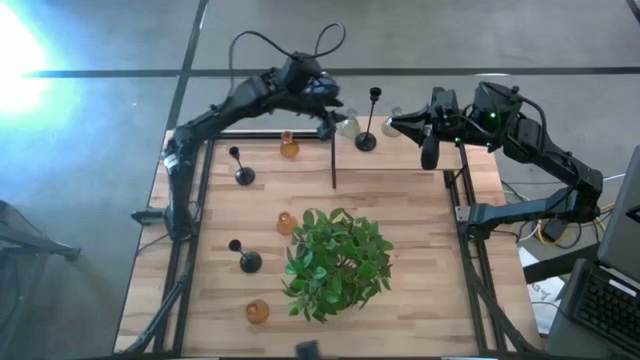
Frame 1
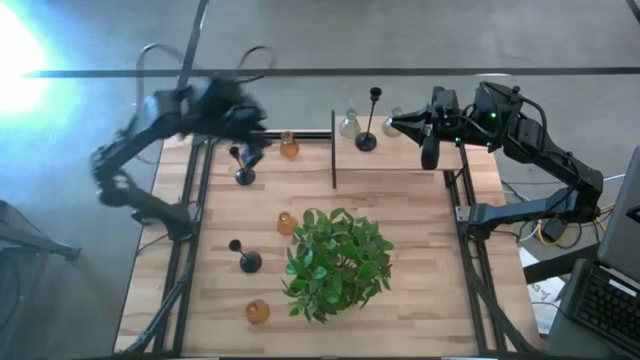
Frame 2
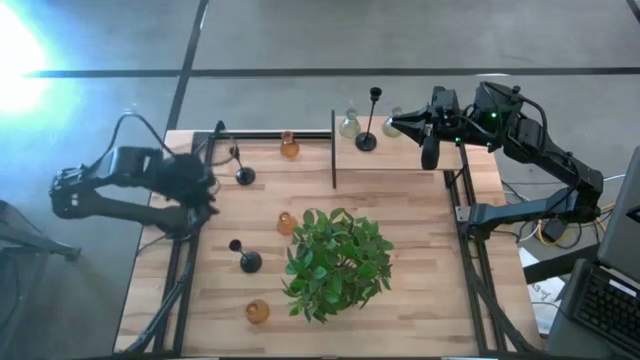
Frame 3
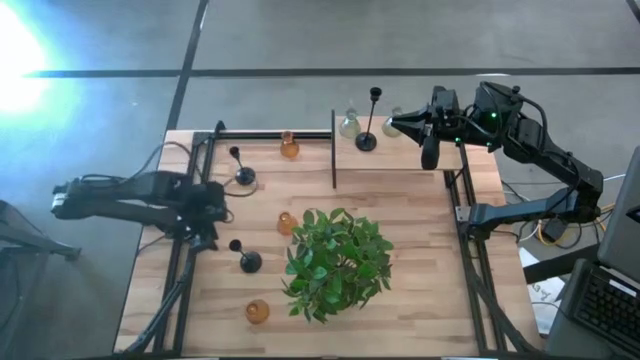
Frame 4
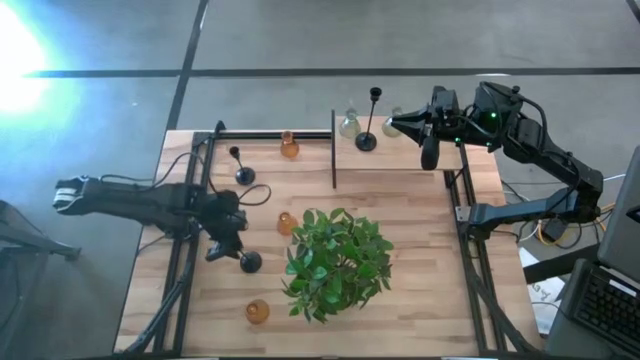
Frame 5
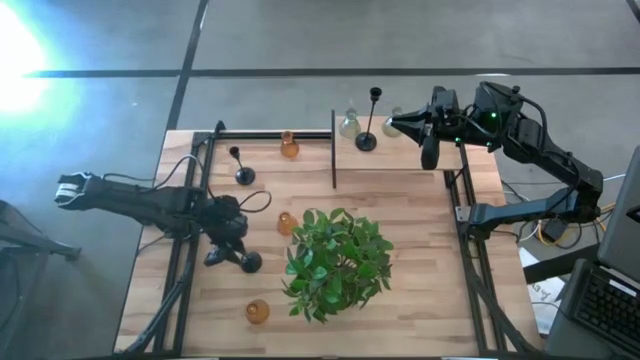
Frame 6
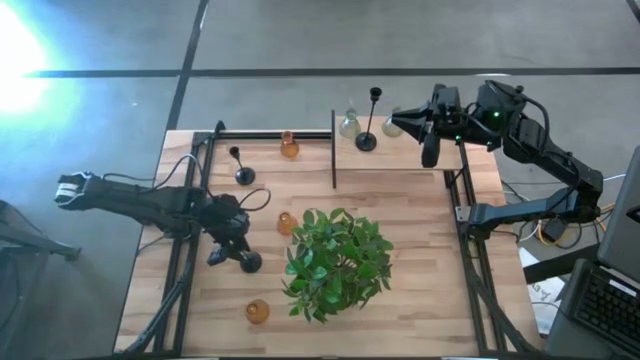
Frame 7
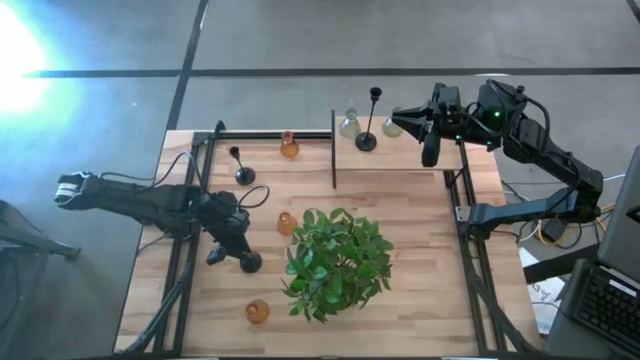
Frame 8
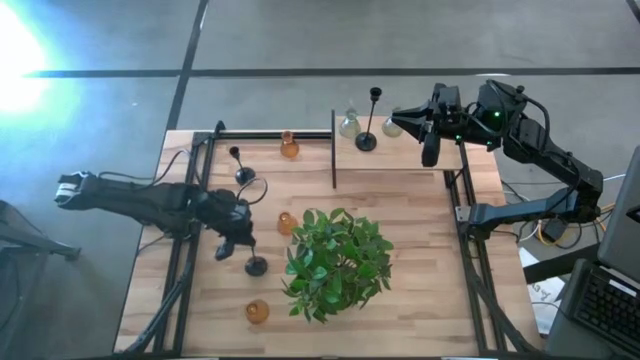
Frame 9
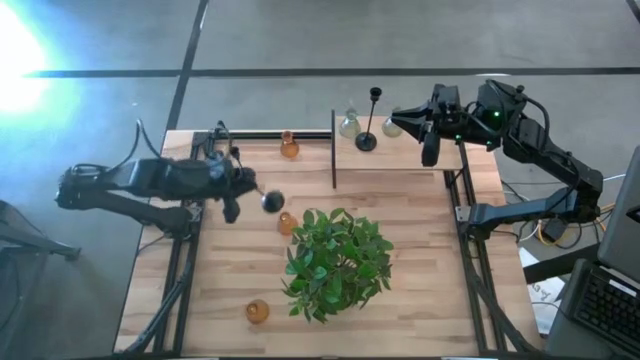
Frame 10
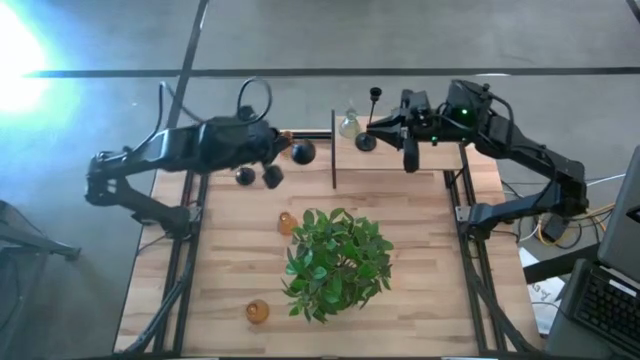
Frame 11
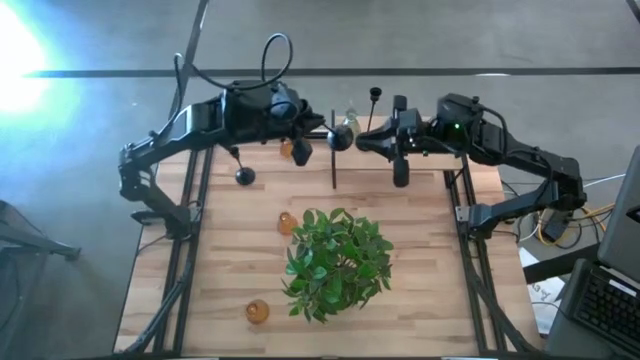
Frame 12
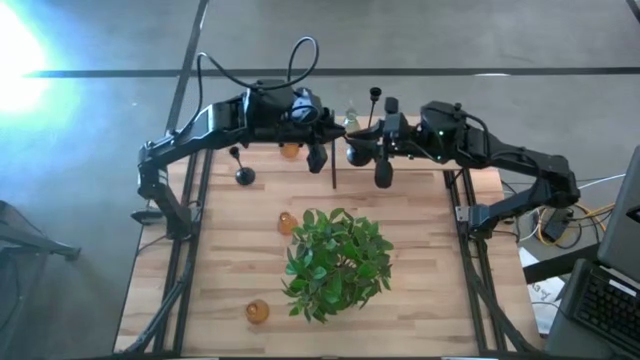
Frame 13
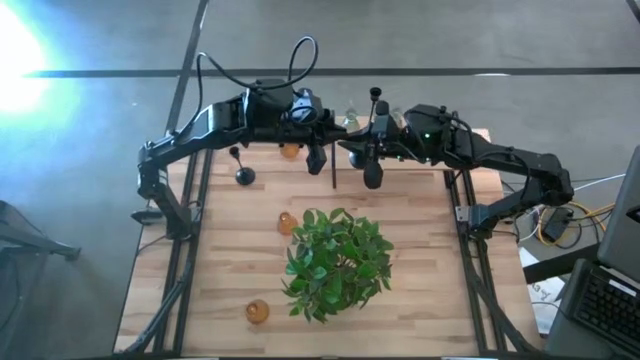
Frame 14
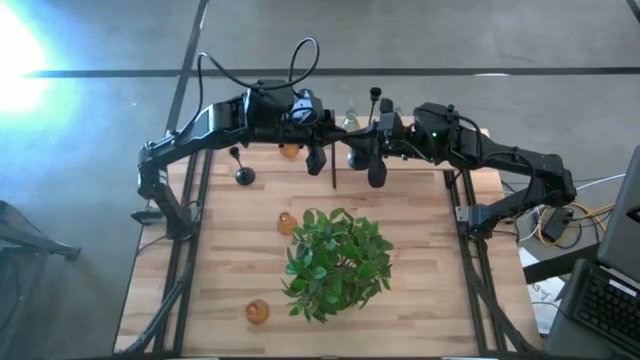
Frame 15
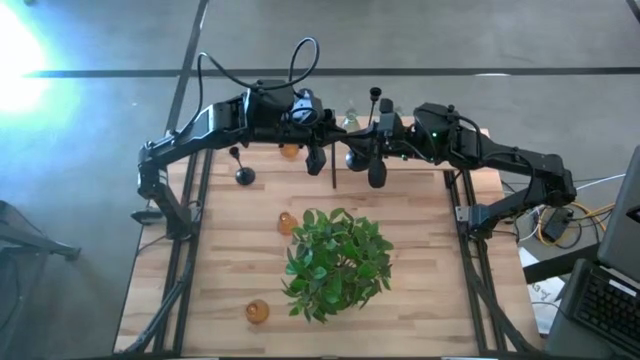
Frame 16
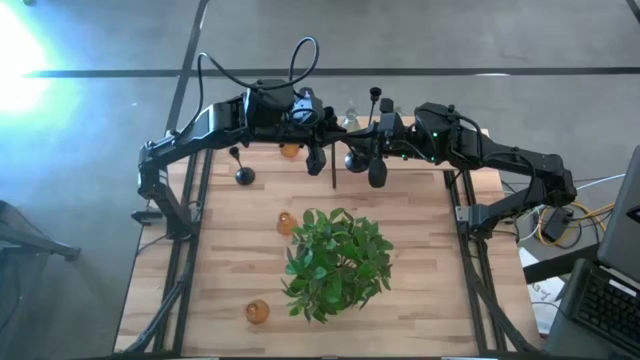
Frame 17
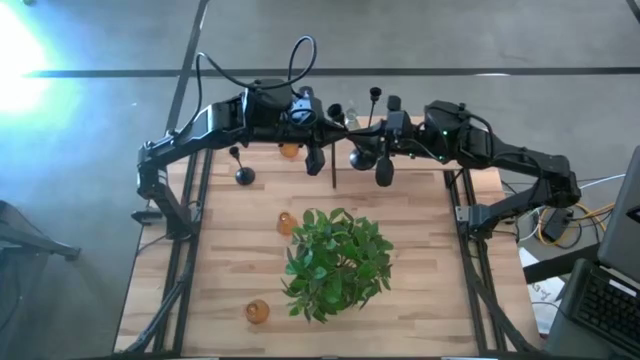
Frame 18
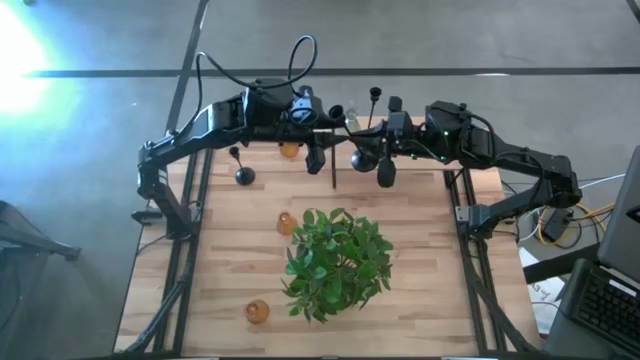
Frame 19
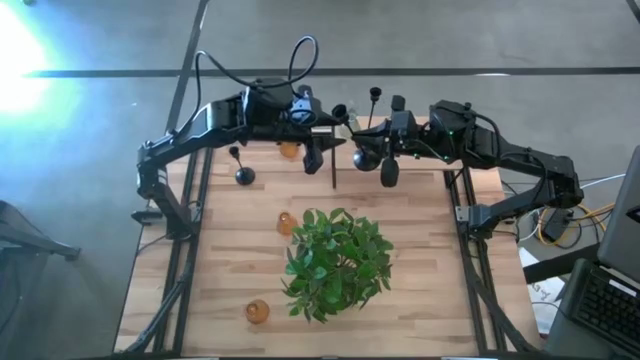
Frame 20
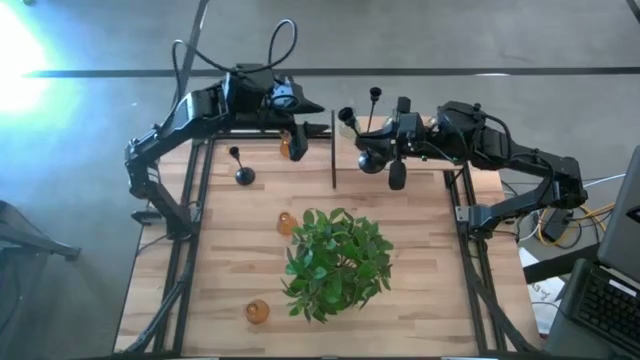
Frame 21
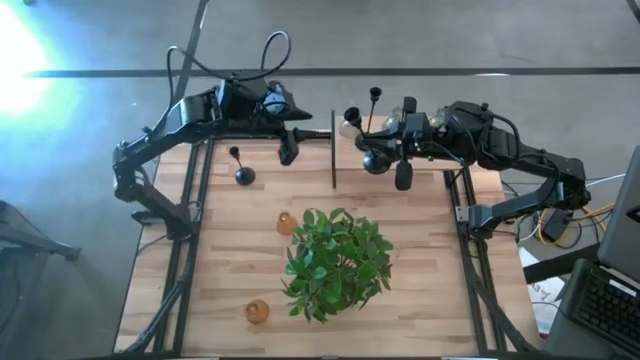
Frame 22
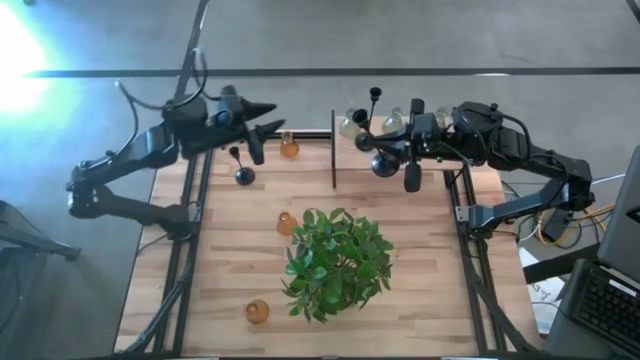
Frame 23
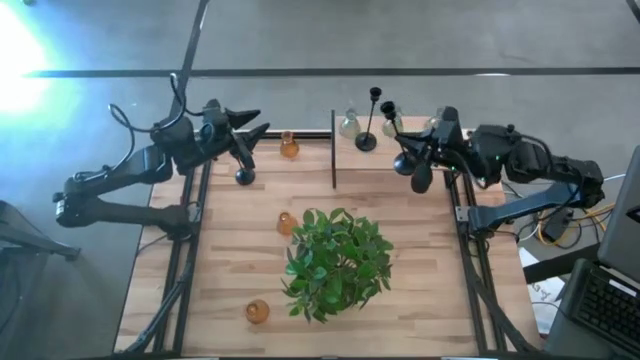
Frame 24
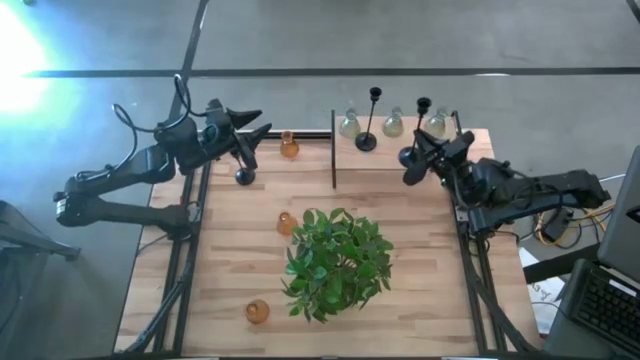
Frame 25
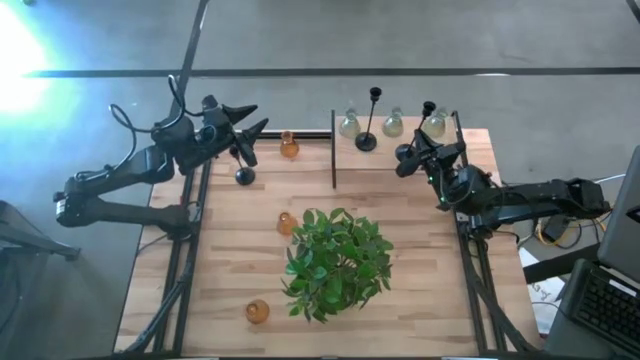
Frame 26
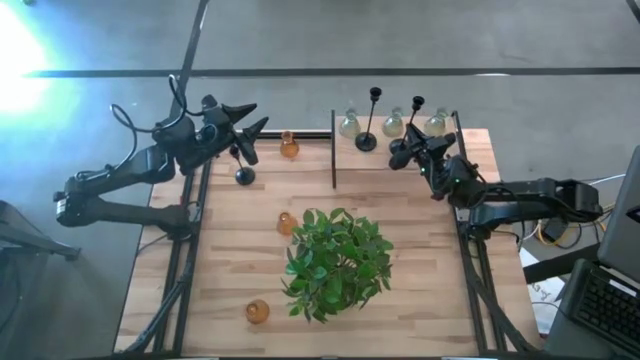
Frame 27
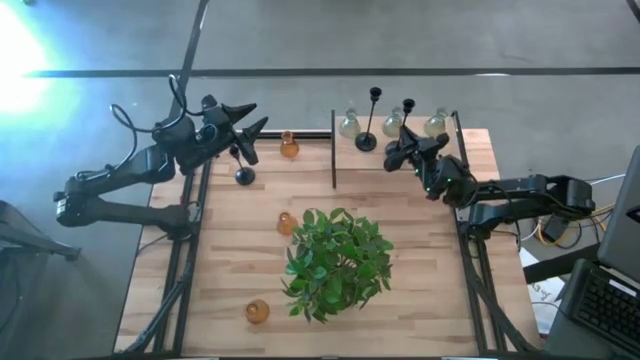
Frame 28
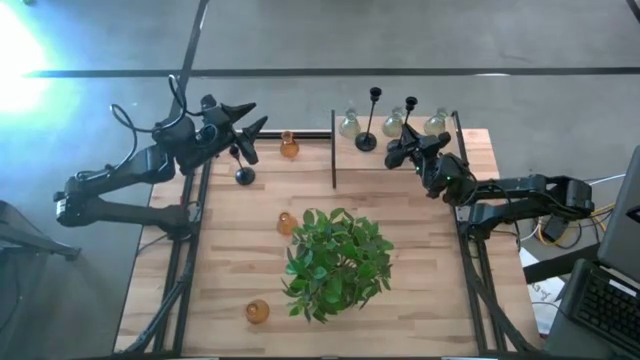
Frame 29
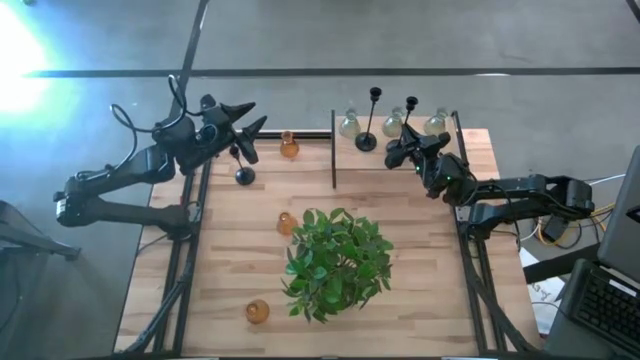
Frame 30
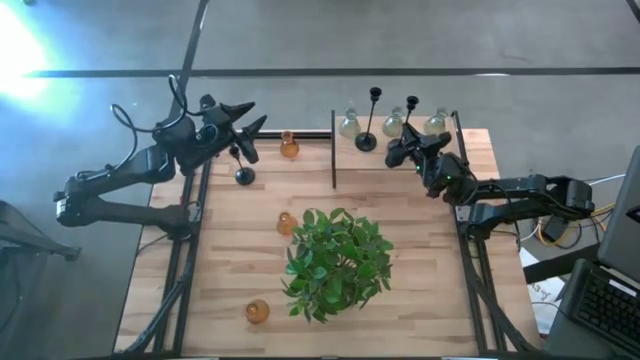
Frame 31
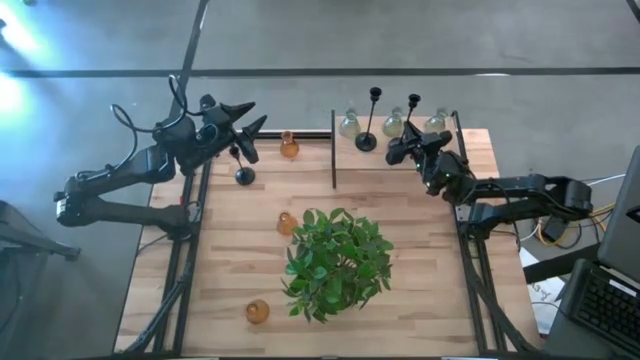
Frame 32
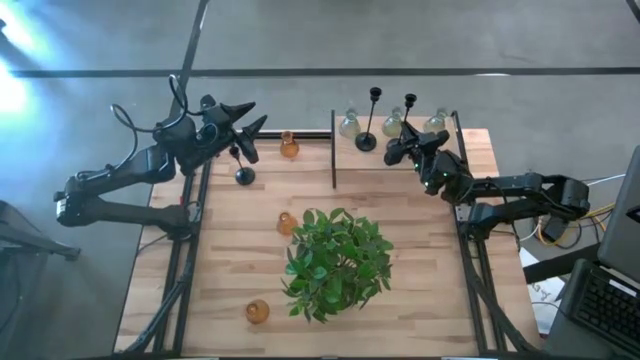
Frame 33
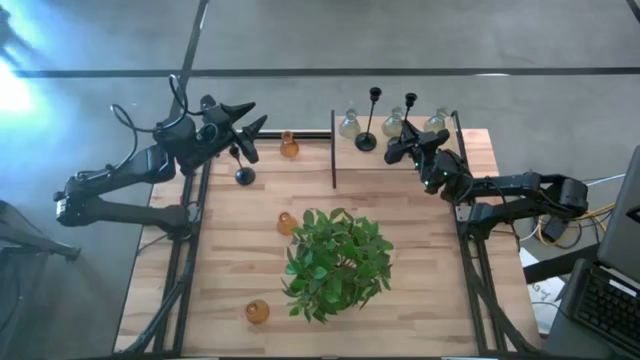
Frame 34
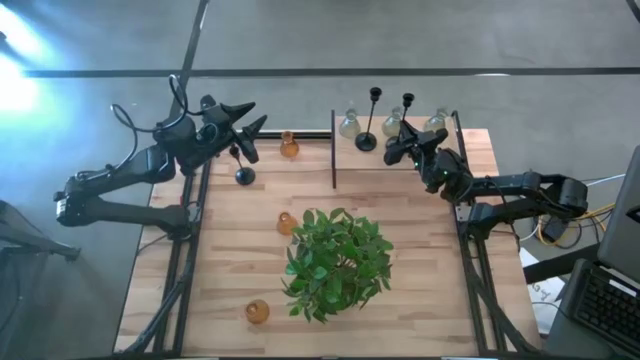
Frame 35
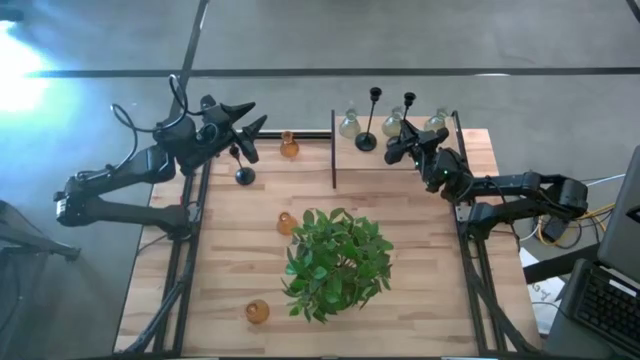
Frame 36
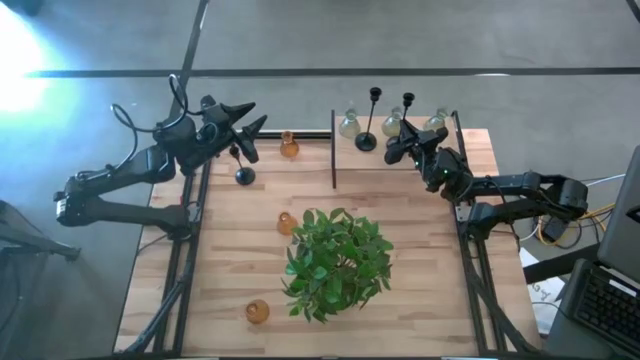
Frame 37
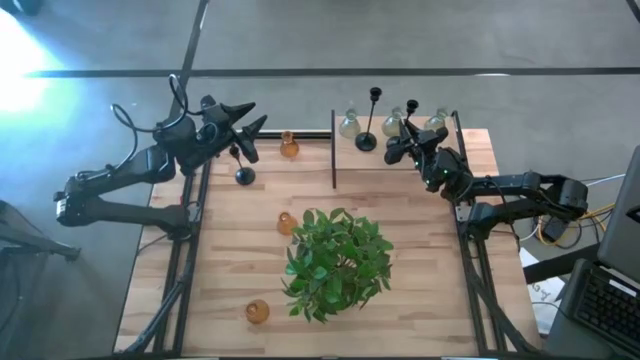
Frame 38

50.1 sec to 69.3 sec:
Task: Pick & Place candle stick holders
Put the bottom black candle holder on the shelf

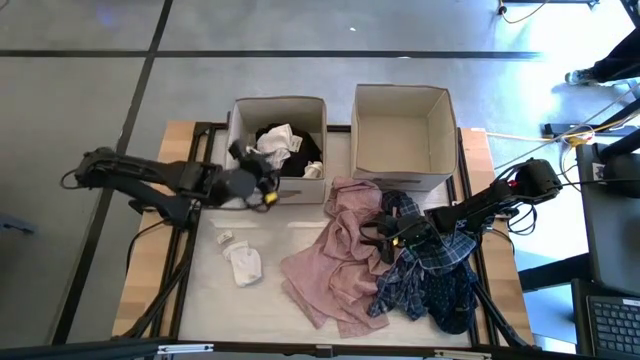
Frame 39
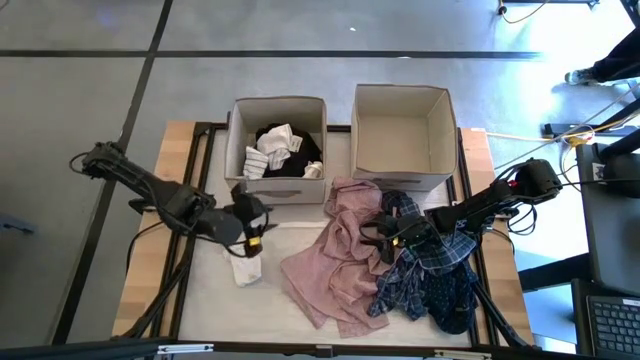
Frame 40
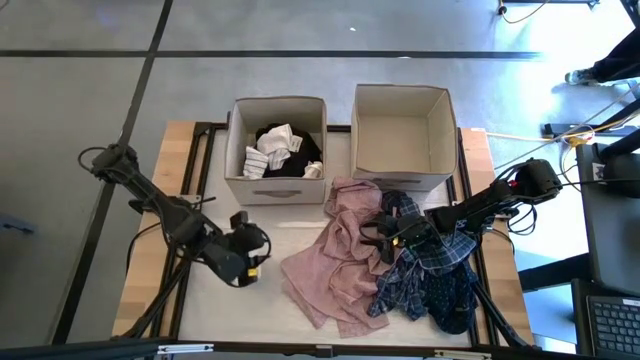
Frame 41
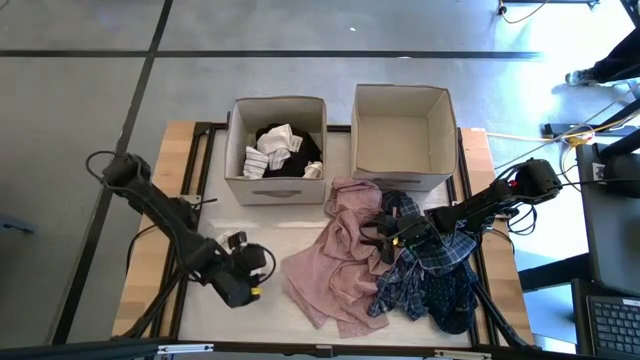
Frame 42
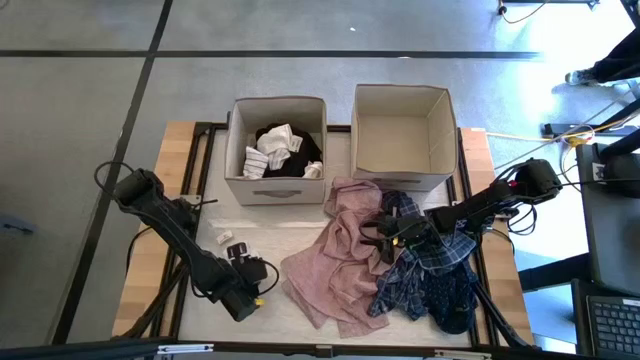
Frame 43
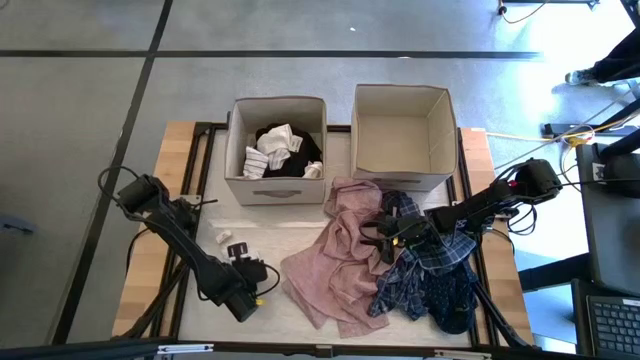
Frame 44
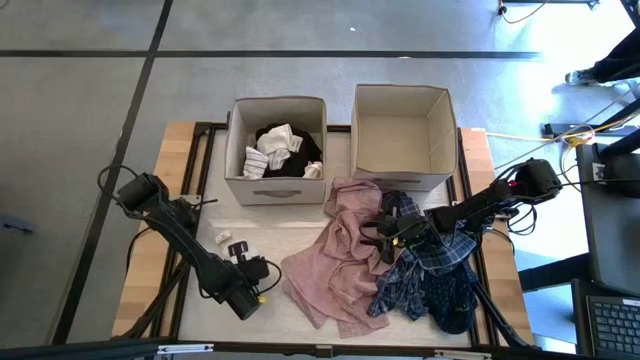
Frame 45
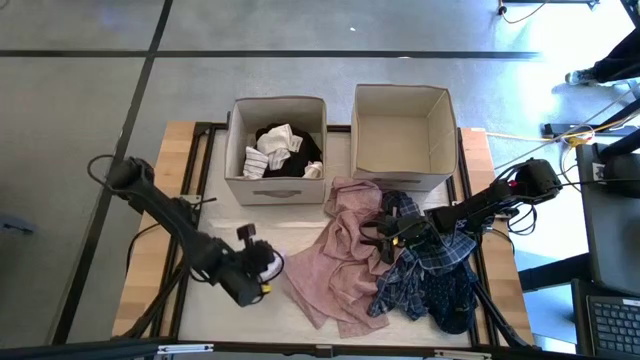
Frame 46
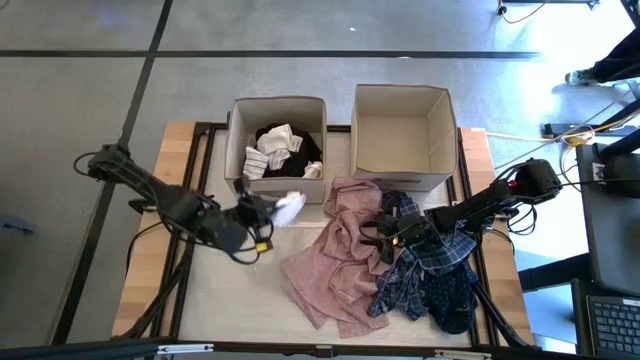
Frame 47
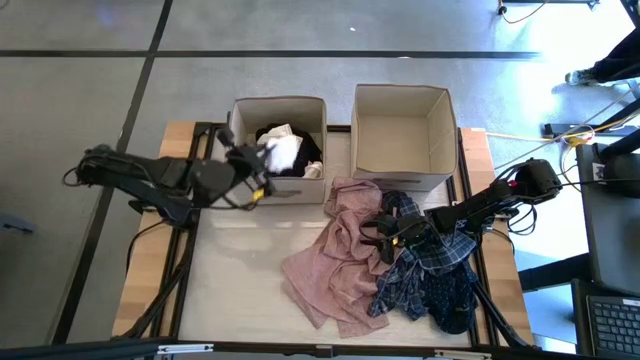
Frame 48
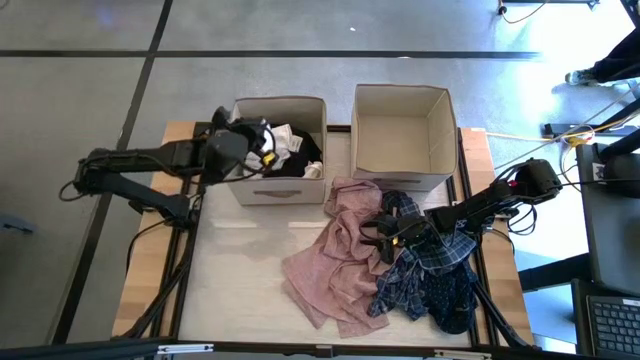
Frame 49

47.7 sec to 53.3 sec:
Task: Sort clothes
Put the white sock into the left laundry organizer
